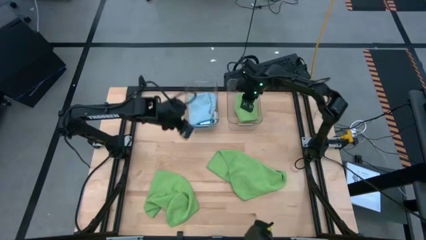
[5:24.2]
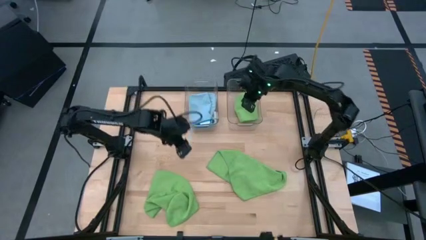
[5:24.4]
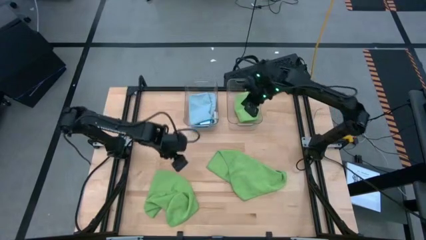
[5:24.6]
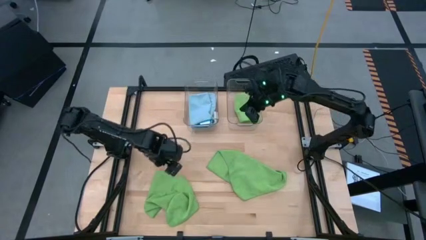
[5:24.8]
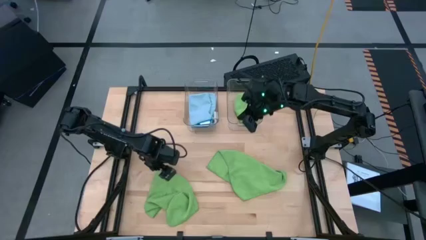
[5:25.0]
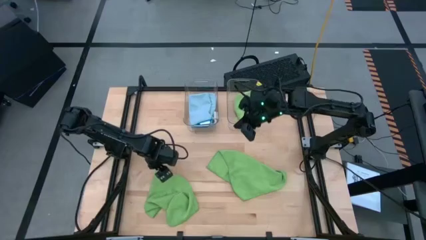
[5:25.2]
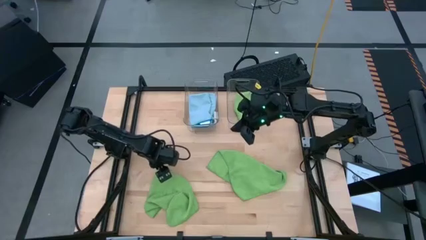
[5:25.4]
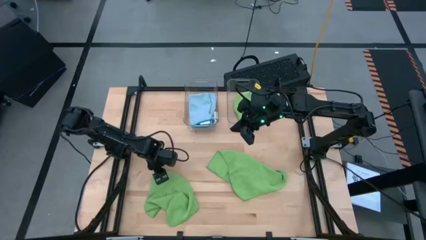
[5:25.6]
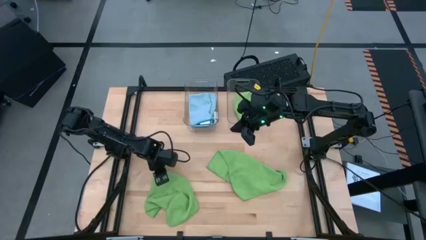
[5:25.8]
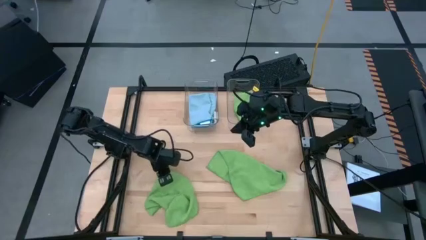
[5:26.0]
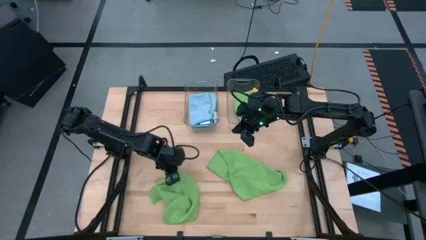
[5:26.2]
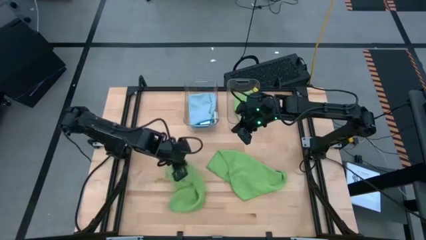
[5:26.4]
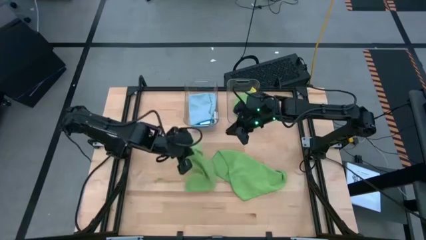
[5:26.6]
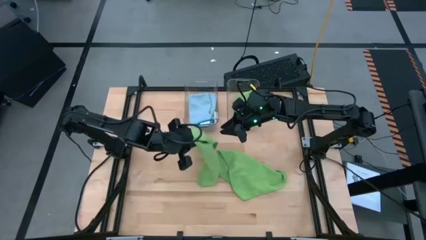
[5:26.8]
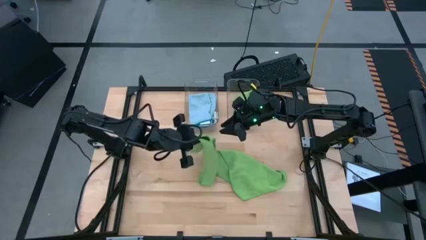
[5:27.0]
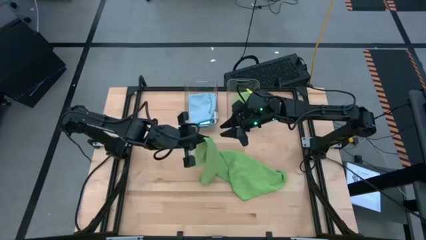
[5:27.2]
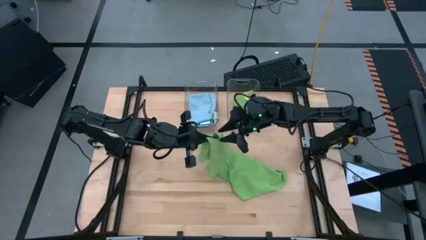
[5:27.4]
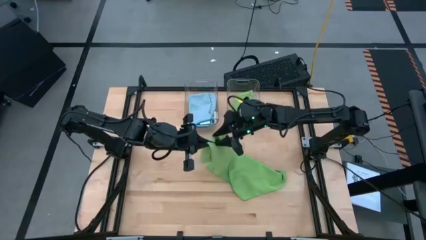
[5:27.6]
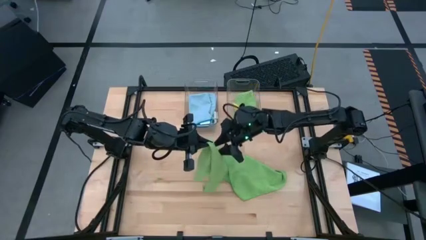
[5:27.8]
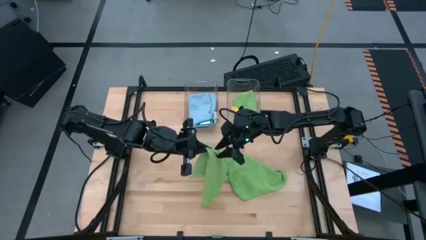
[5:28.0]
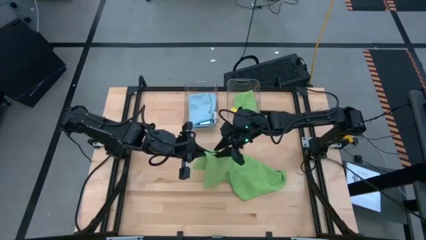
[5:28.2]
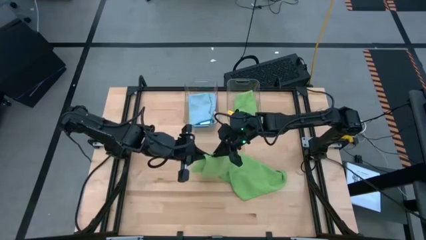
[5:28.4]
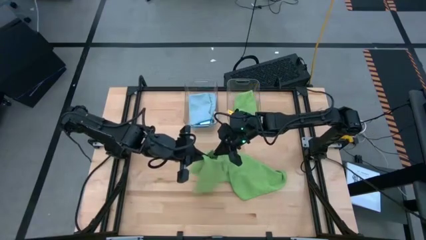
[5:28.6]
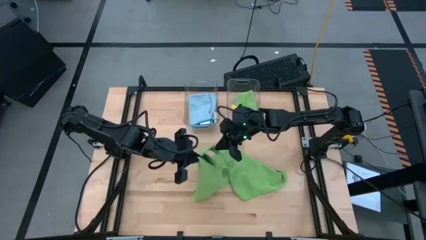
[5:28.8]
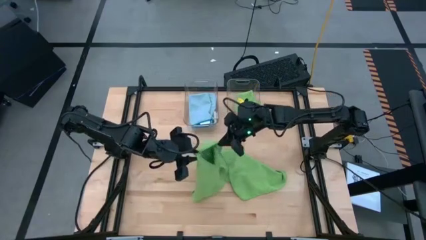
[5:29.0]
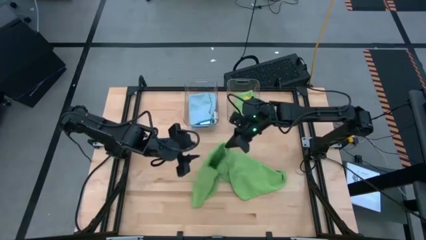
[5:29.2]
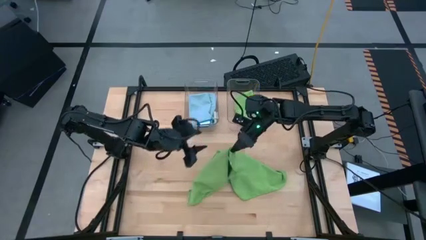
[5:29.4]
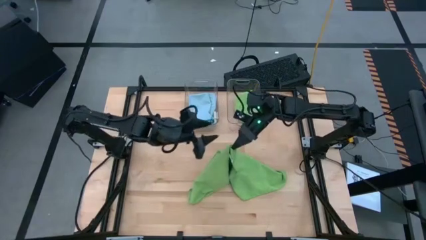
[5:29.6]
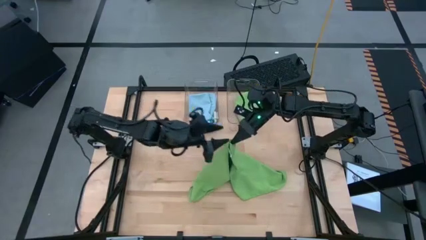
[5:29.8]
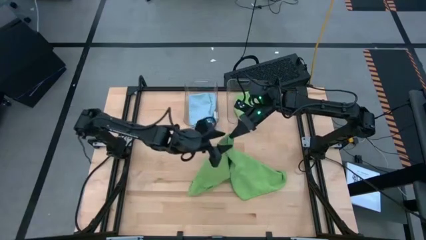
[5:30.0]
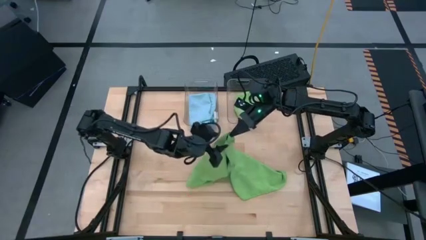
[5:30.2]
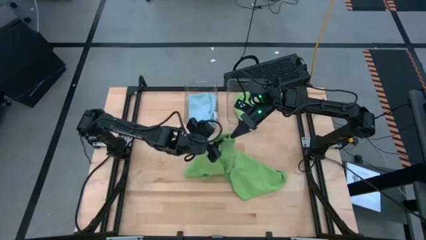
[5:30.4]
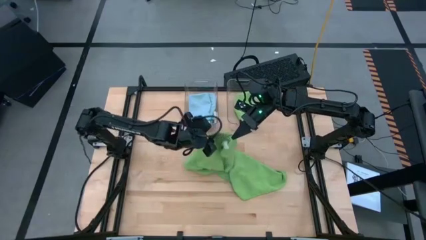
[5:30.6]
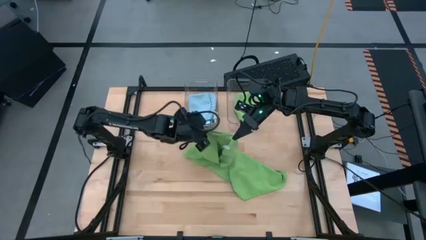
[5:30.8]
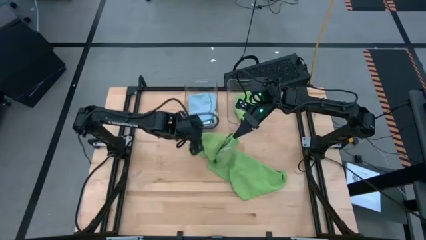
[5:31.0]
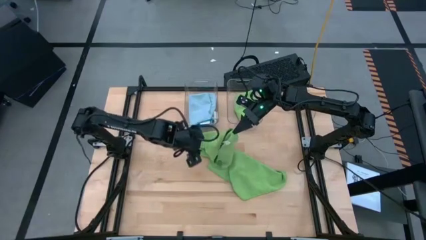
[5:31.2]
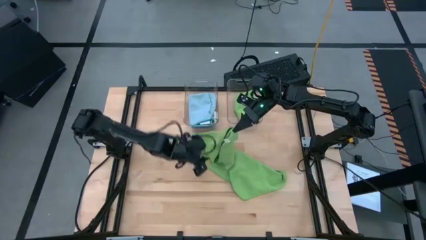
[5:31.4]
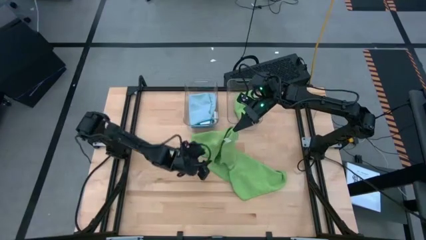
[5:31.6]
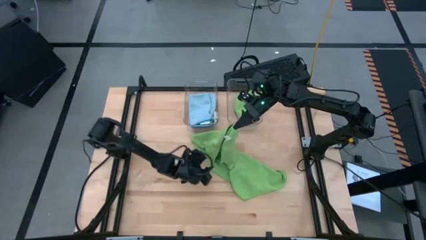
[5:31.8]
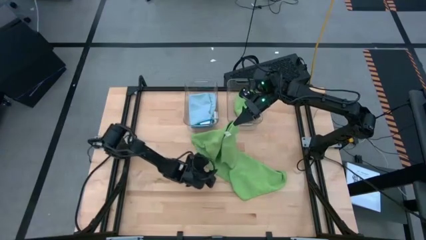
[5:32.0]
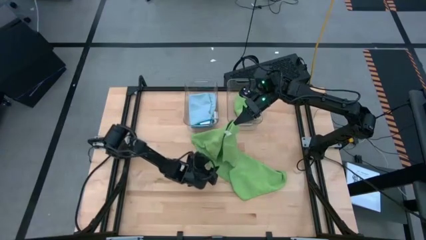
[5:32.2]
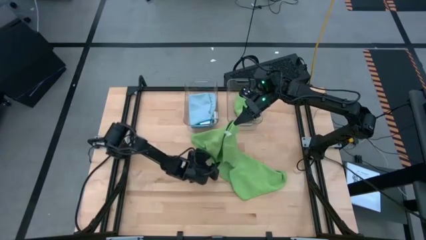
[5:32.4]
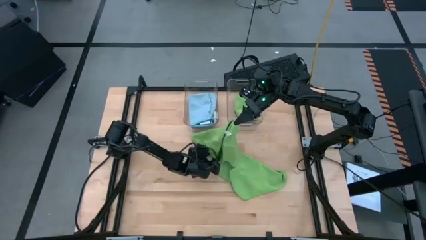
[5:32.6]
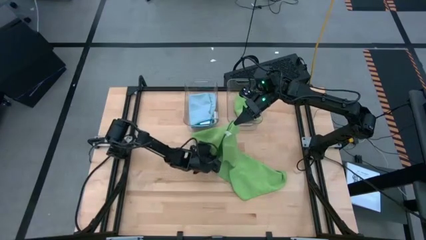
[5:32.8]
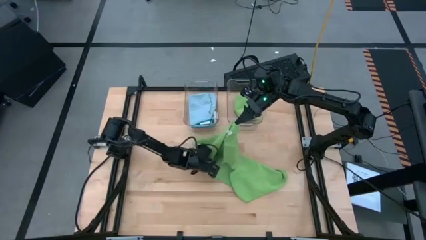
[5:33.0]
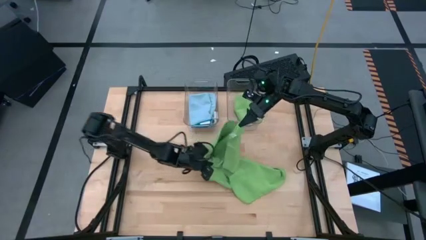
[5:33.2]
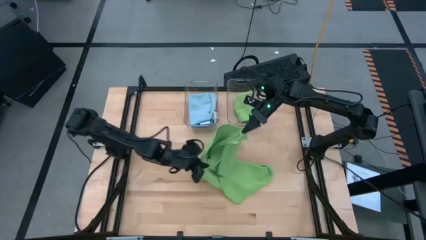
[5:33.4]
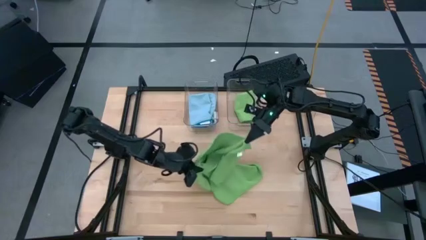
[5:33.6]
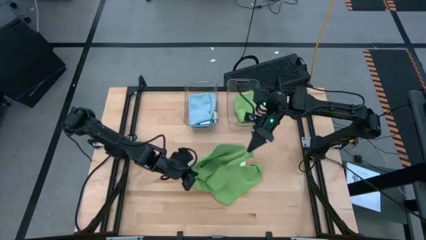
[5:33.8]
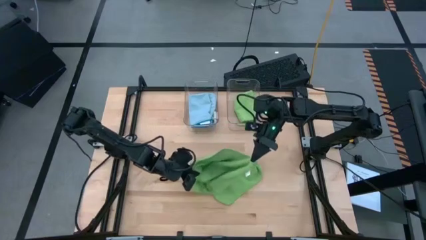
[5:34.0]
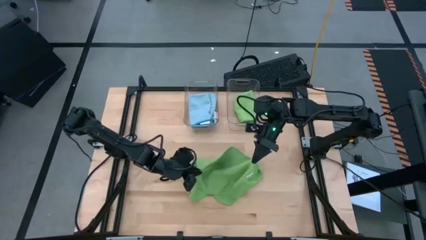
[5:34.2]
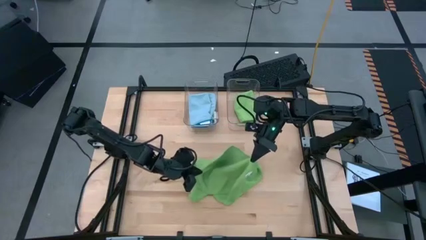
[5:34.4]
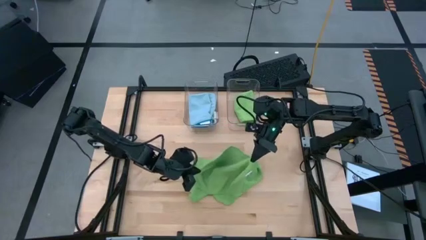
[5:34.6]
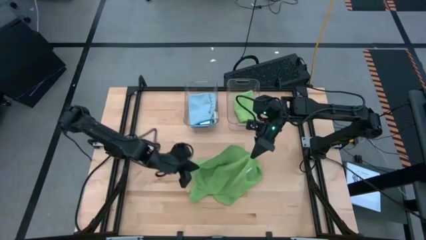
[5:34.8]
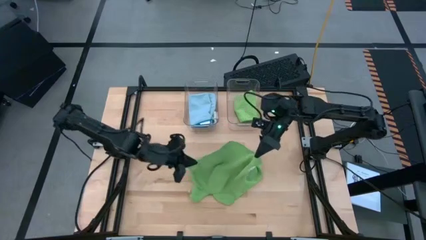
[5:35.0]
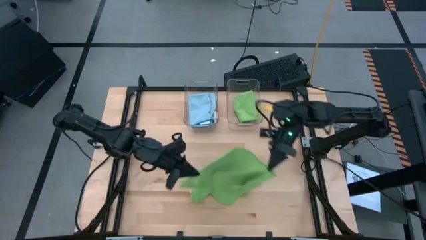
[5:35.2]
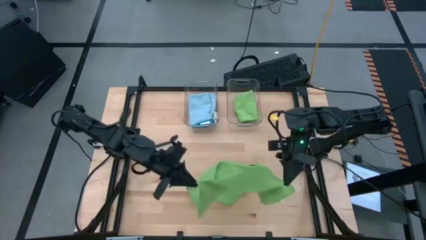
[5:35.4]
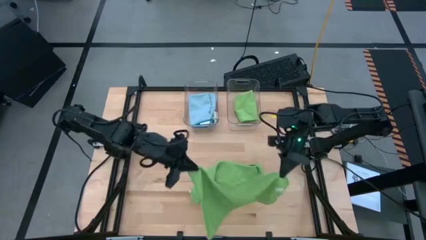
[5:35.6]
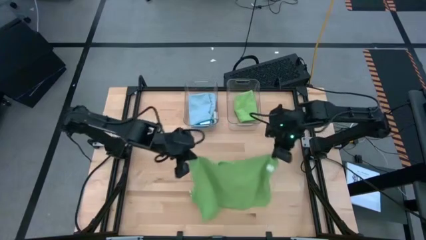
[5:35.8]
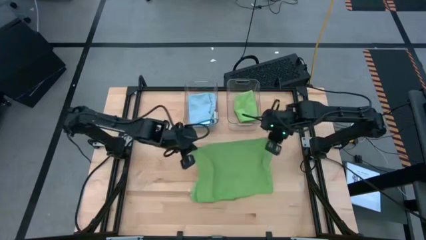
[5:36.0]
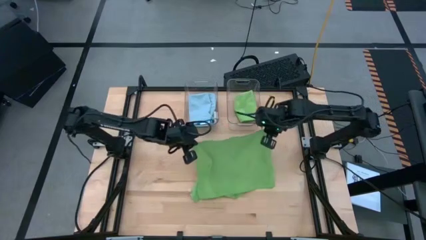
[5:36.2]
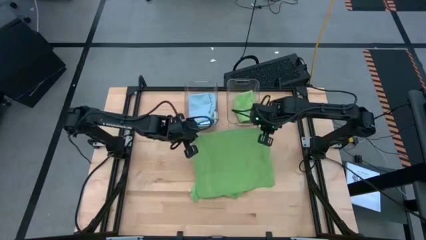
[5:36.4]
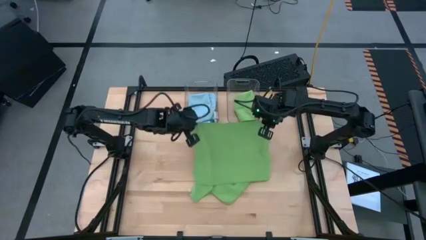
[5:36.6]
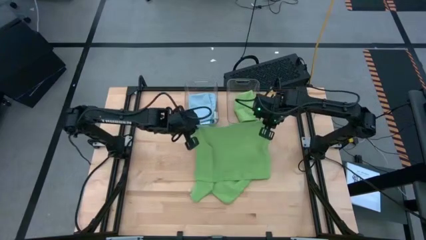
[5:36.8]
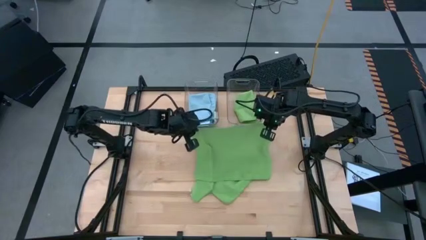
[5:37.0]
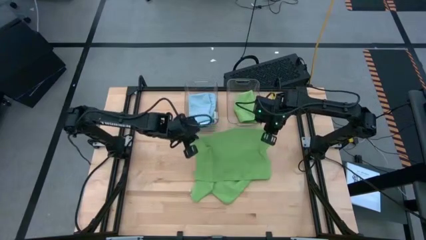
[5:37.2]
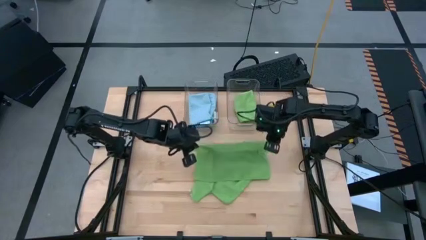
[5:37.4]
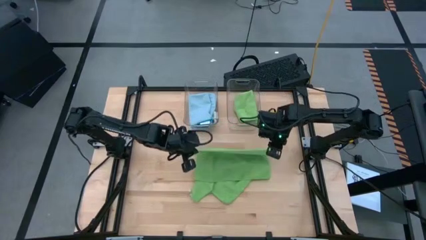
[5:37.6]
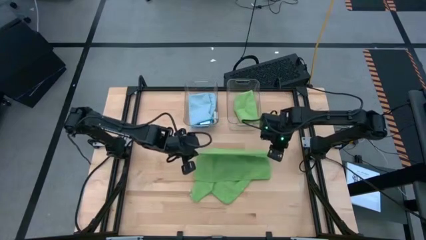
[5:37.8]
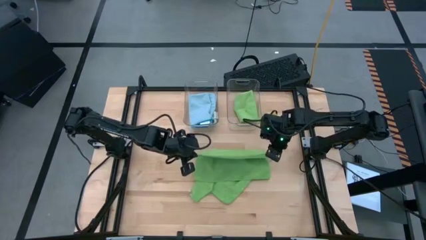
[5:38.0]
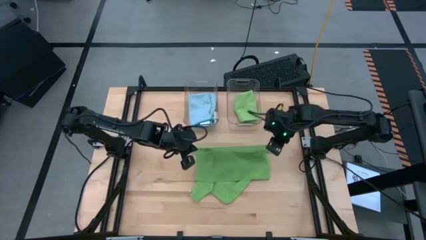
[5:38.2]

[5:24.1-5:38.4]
Task: Fold microfiber towels
Fold the left green microfiber towel
